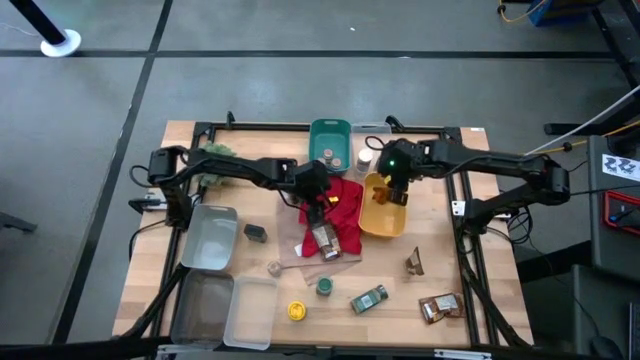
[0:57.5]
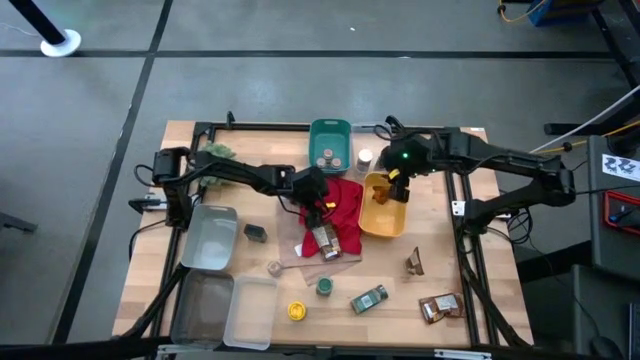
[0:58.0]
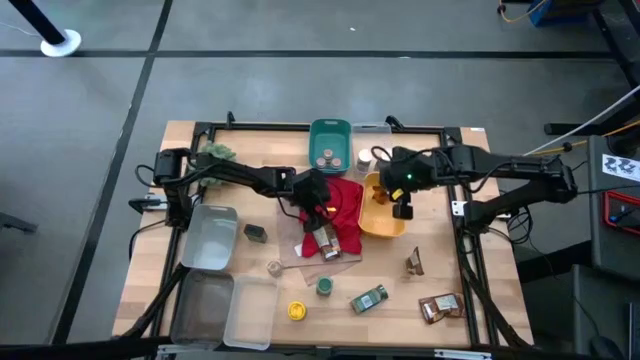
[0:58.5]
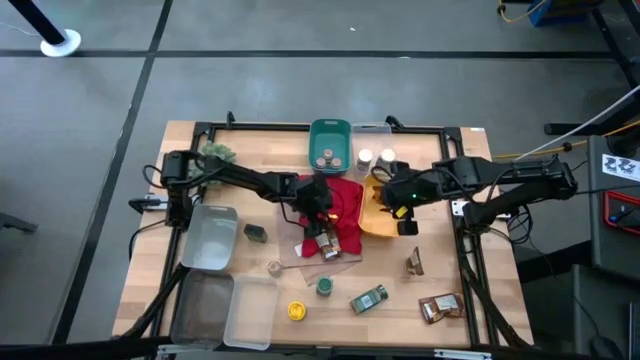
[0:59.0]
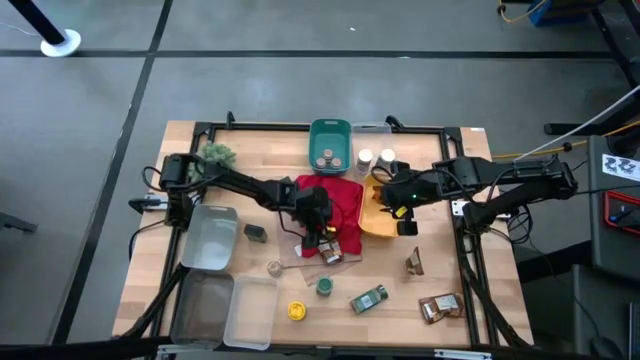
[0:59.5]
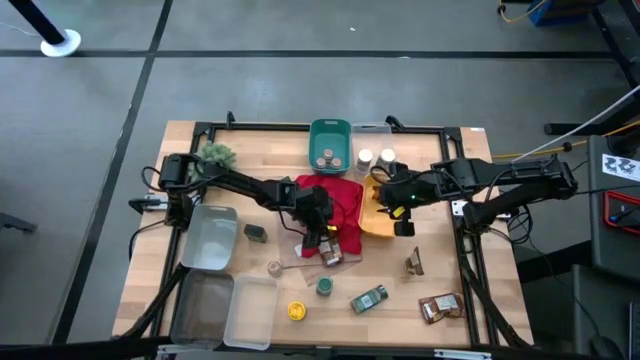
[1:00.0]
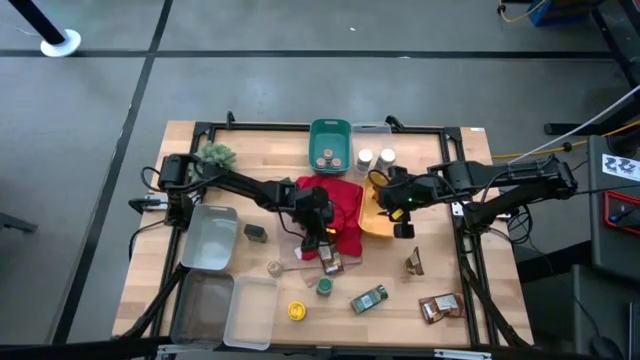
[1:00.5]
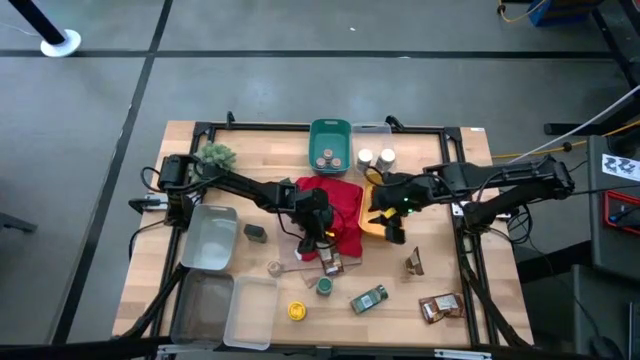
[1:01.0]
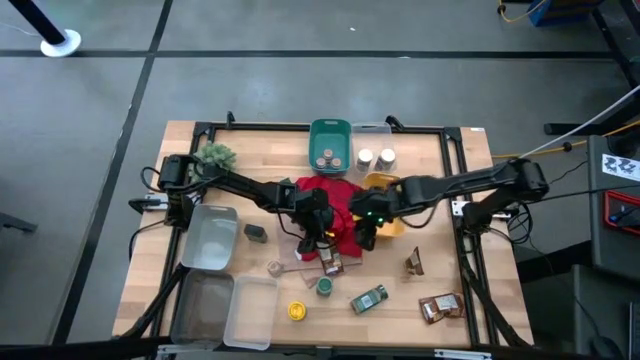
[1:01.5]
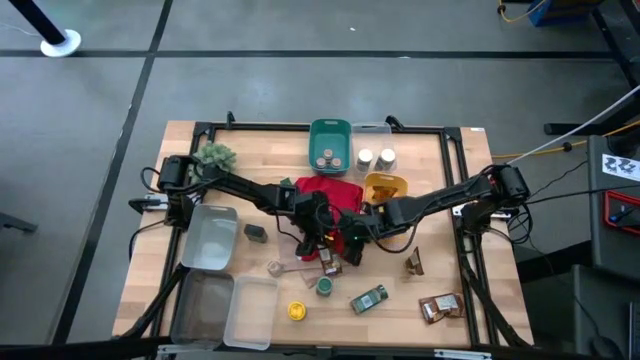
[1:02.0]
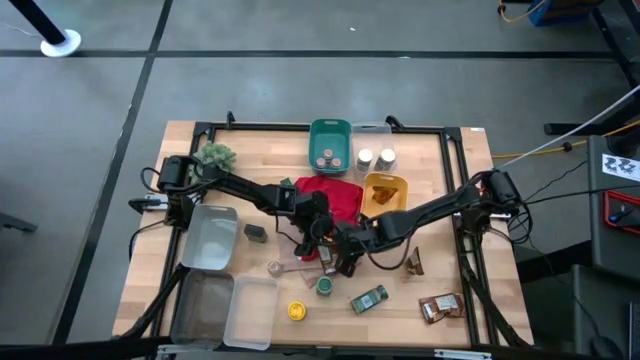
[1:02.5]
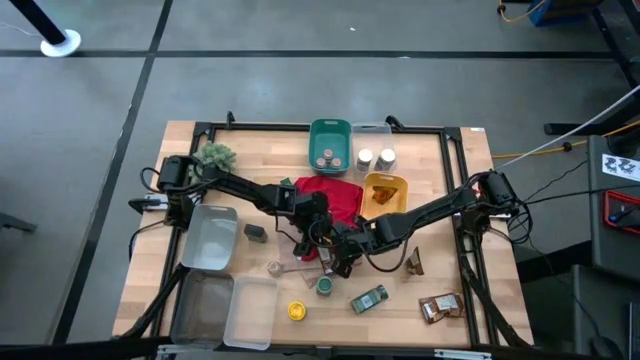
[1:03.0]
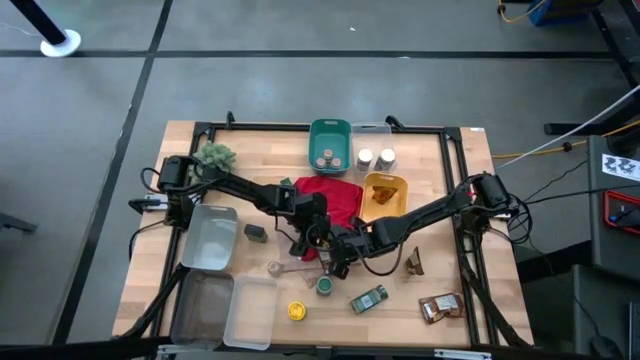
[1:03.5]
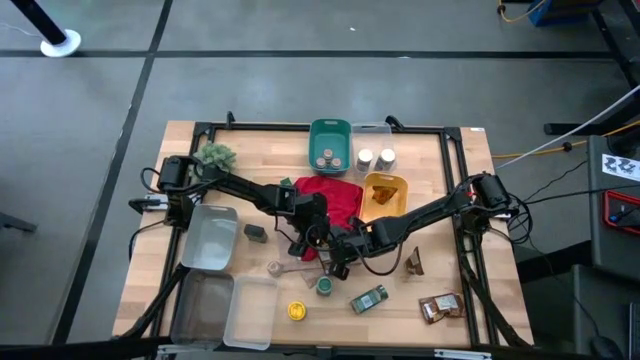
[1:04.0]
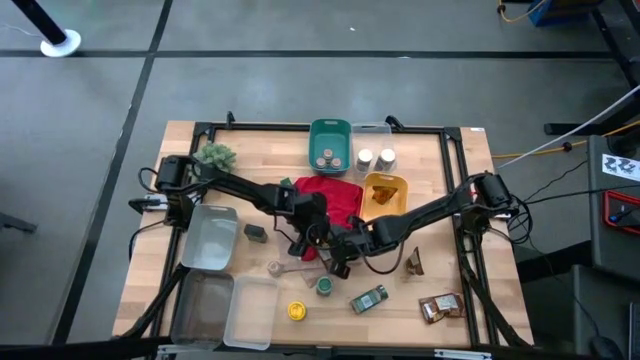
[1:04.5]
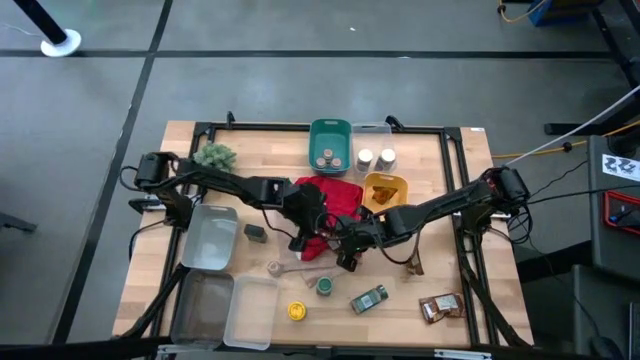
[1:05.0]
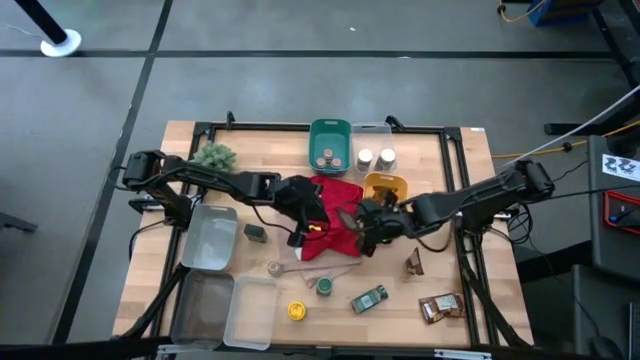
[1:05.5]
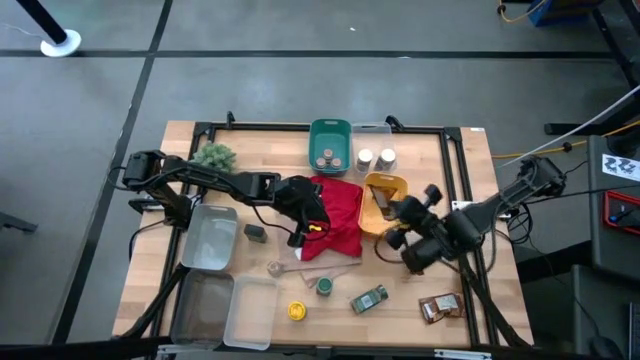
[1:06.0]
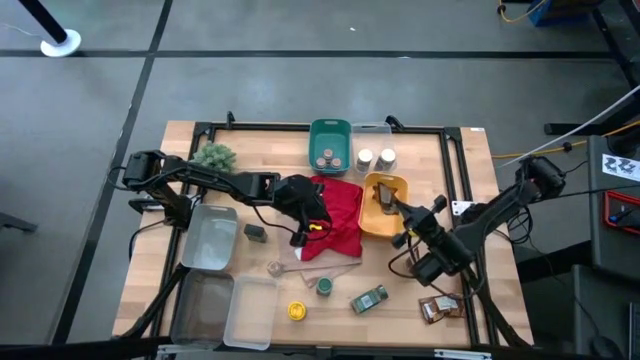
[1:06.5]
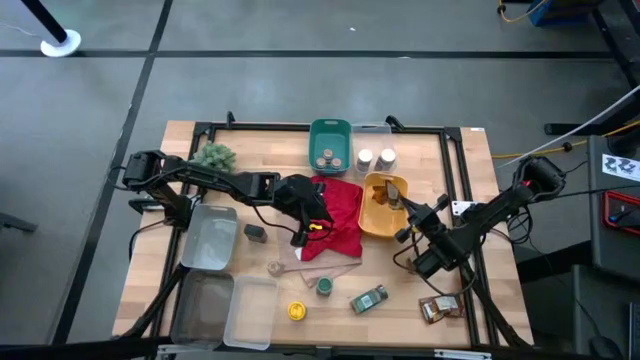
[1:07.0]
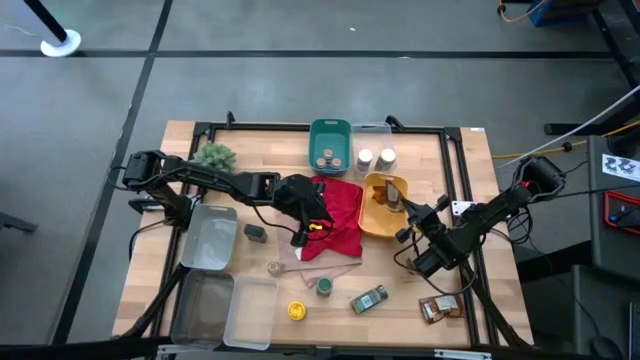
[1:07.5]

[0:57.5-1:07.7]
Task: Sort spices by type
Put the center brown seasoning sachet into the yellow bin

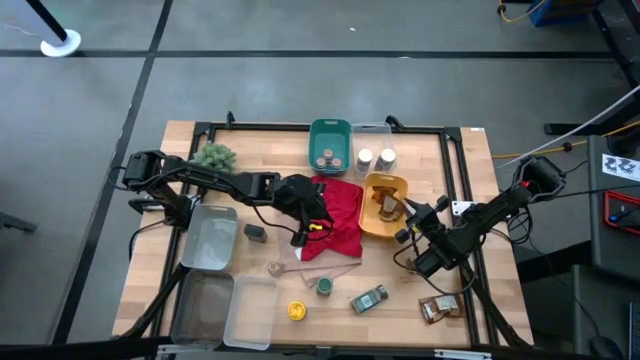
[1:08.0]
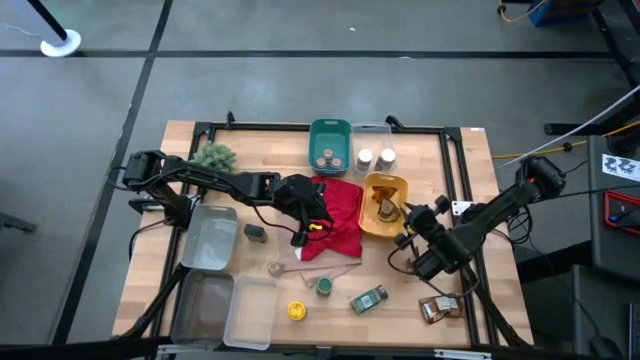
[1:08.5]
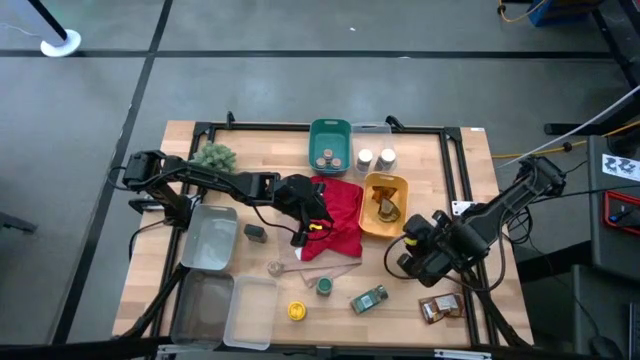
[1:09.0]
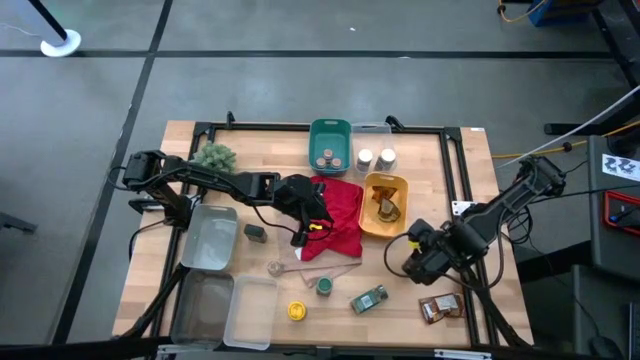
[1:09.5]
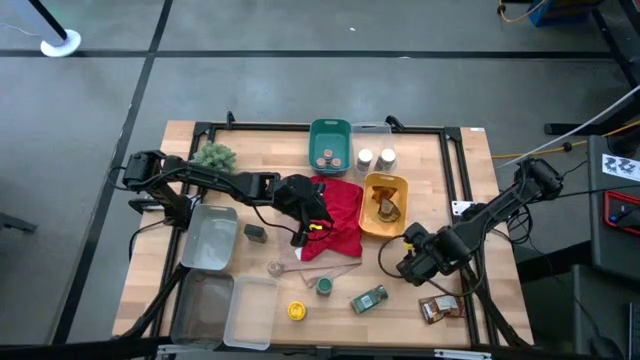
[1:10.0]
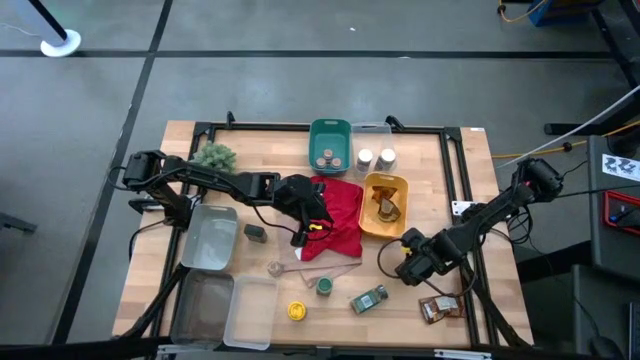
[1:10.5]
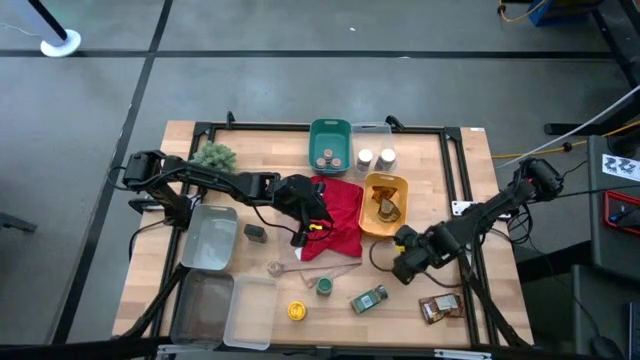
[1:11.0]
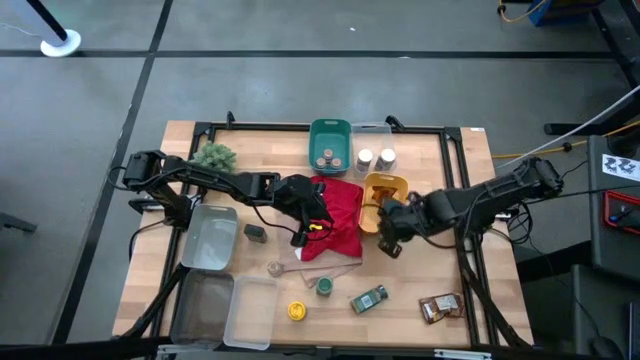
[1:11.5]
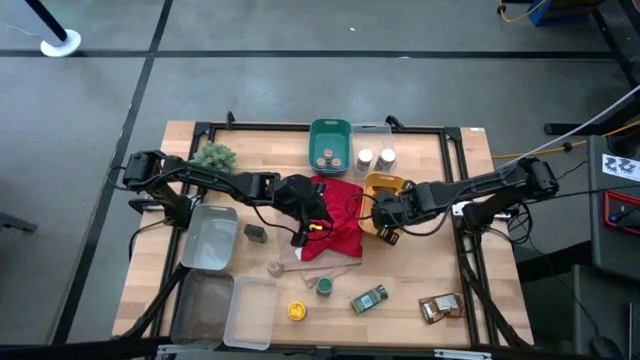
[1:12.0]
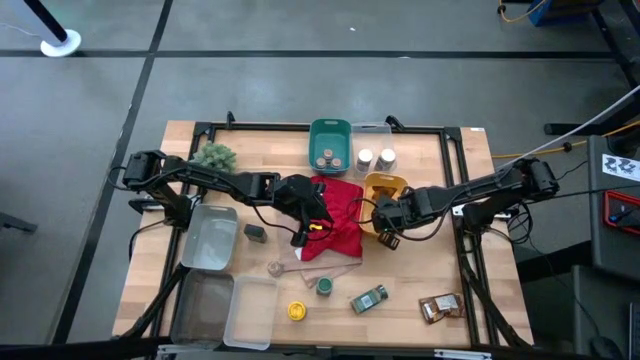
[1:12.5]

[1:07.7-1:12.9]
Put the top brown seasoning sachet into the yellow bin

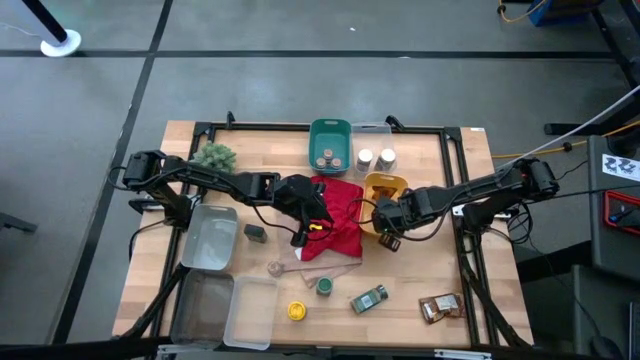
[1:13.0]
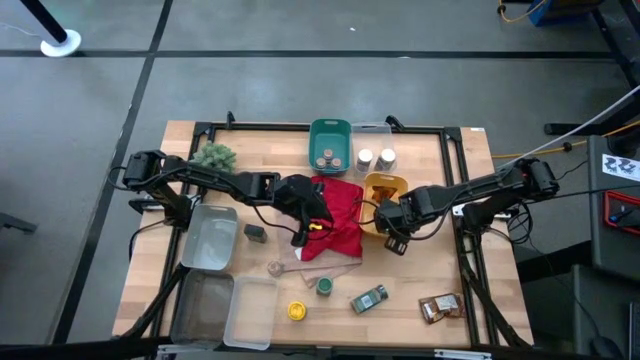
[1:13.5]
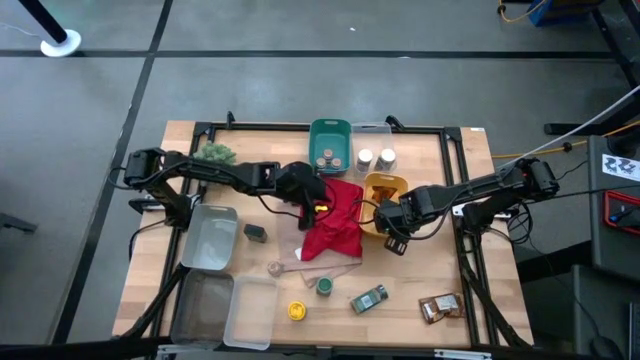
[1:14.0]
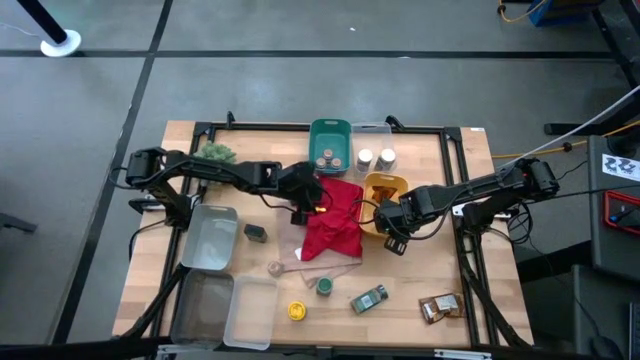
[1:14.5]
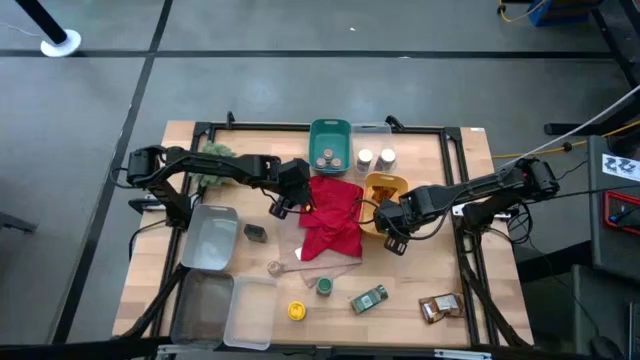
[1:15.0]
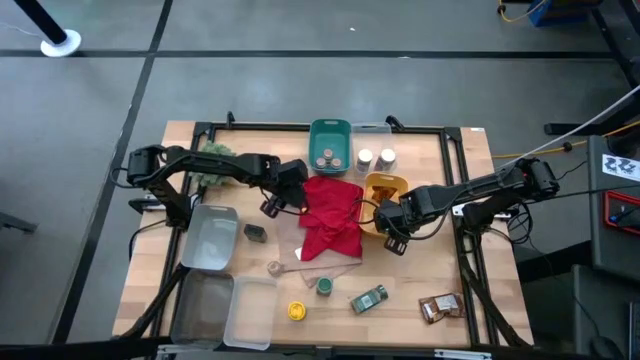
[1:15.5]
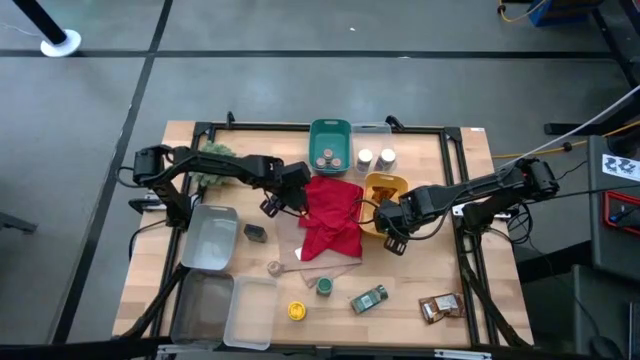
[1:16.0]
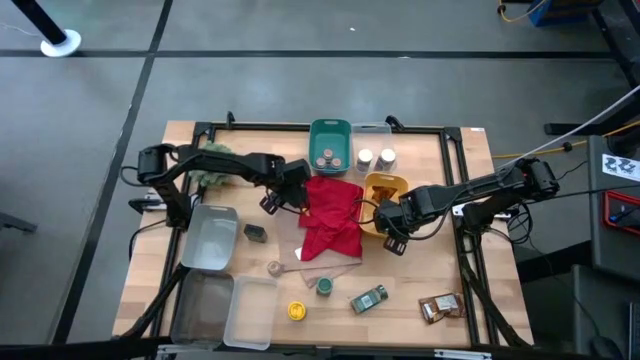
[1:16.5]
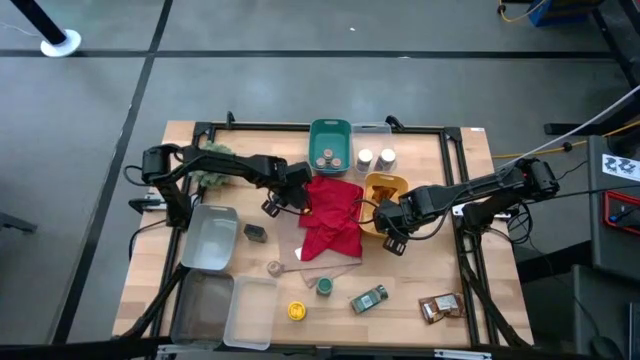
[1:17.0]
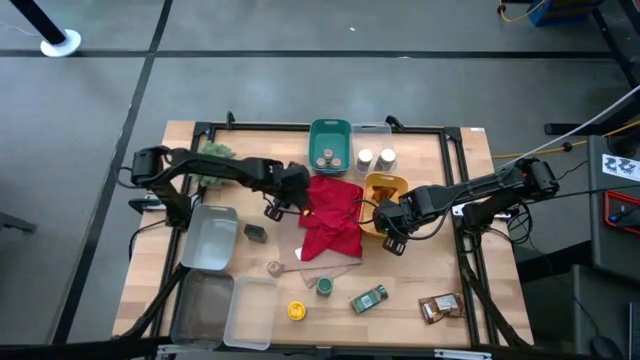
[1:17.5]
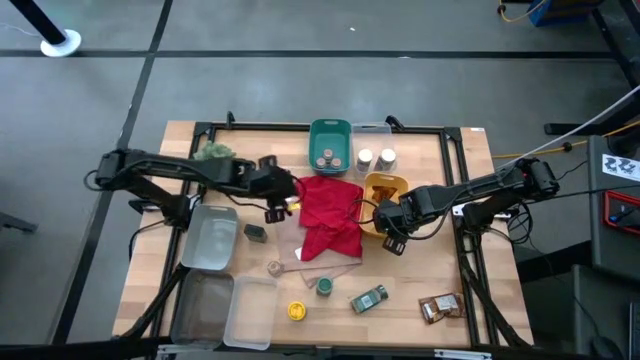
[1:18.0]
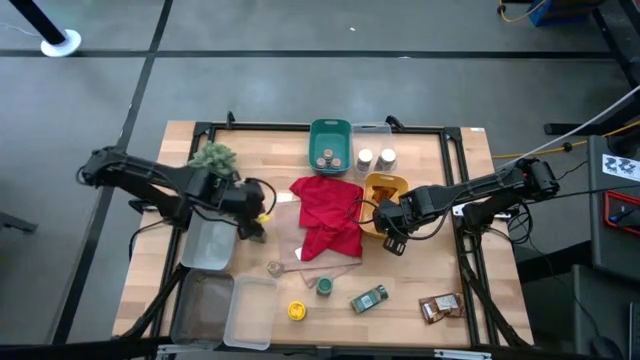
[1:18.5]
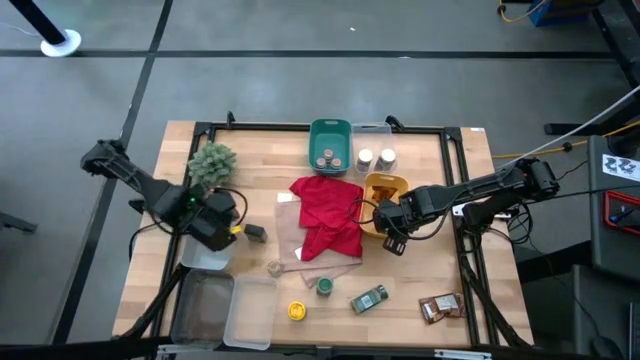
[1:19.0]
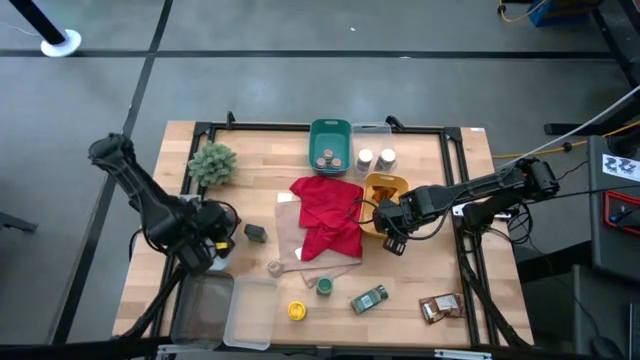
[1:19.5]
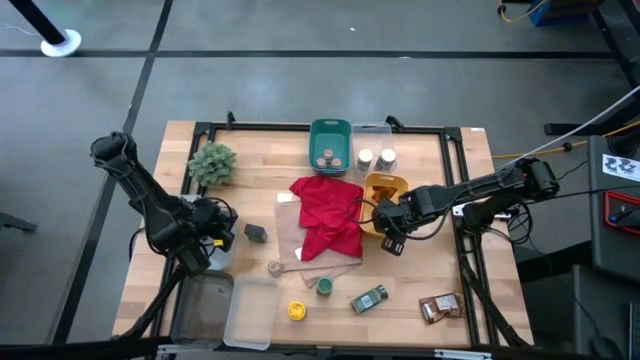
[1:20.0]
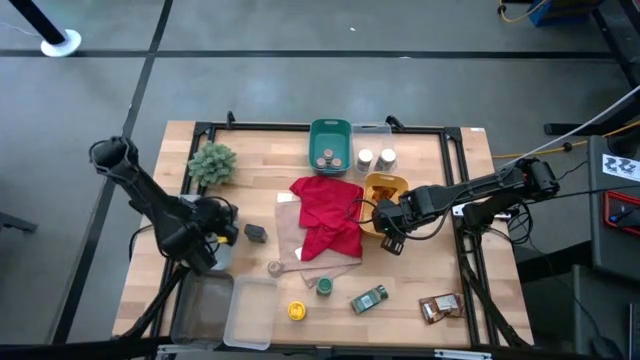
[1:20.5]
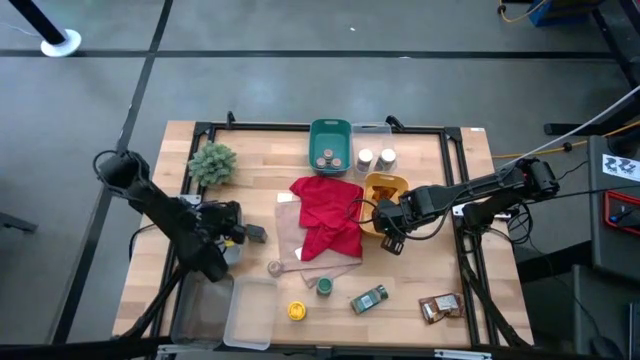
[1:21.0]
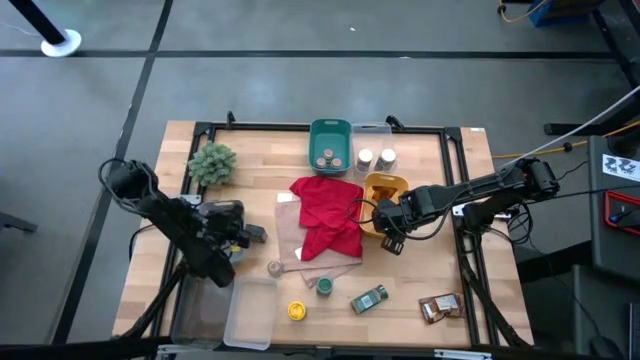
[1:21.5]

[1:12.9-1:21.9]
Put the top green seasoning can into the gray bin
